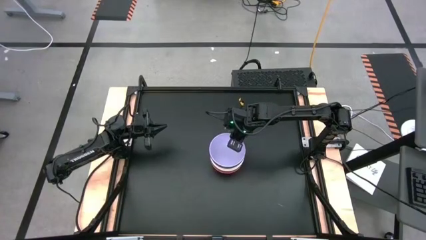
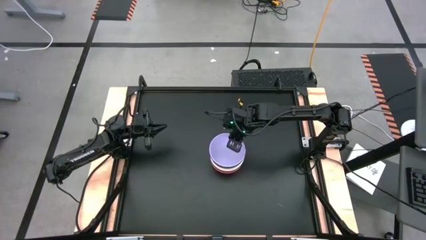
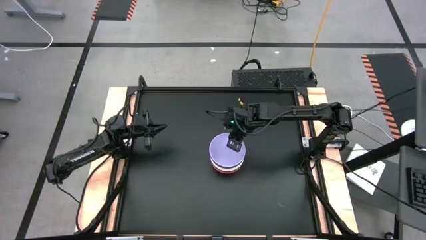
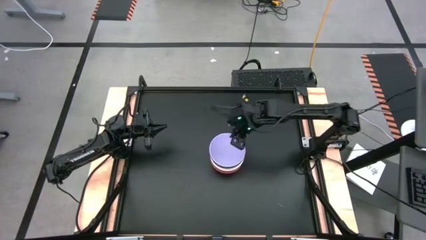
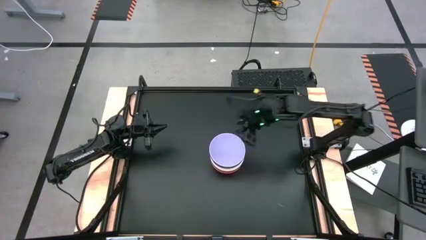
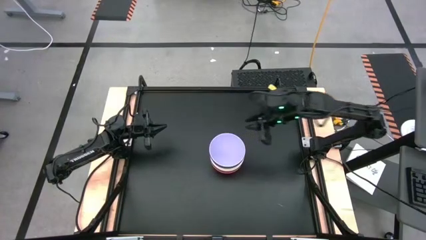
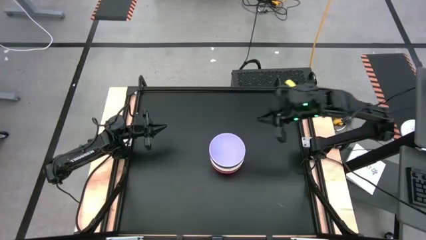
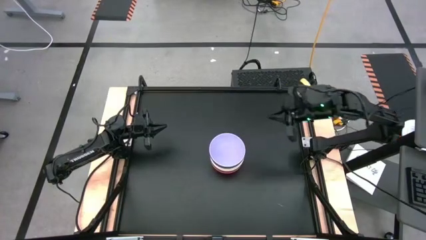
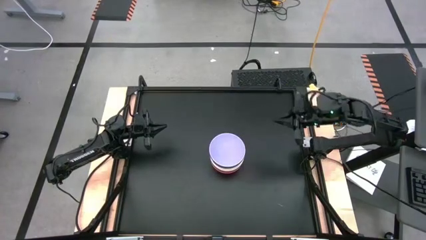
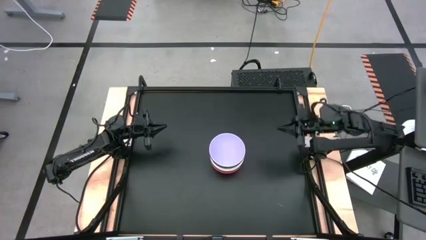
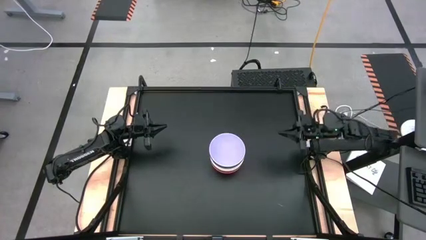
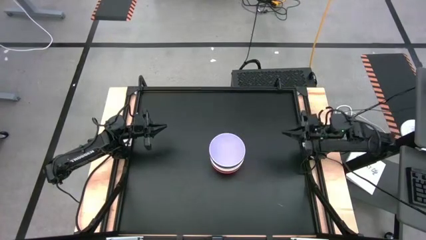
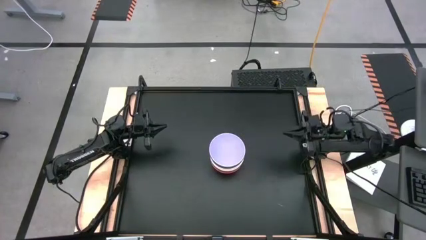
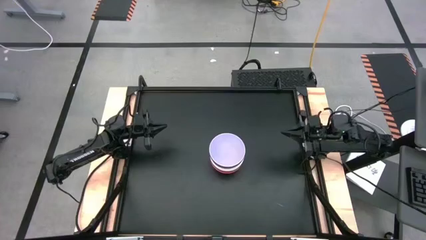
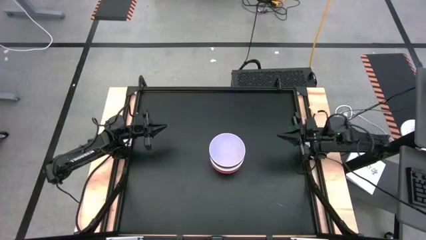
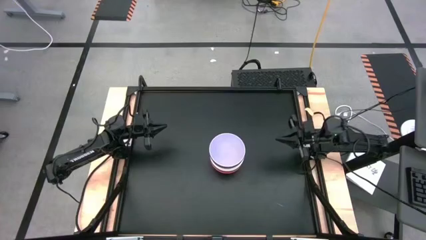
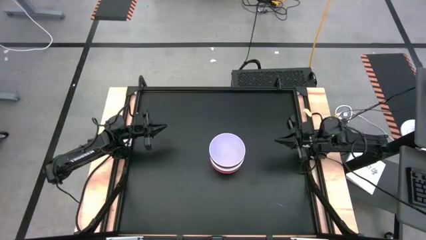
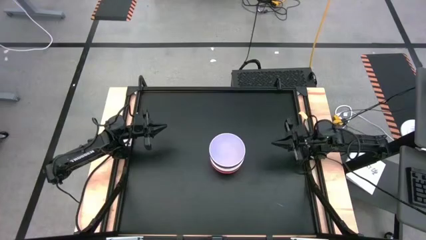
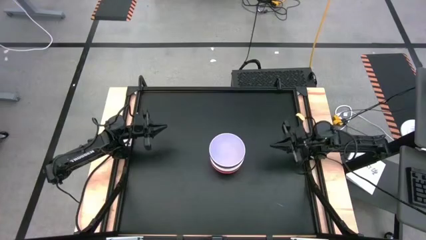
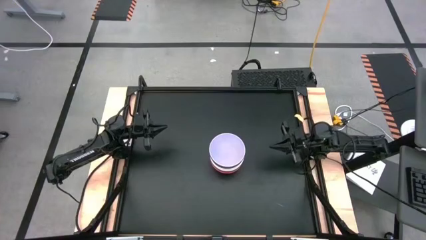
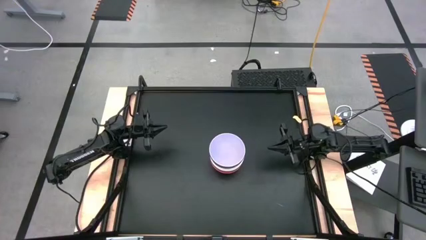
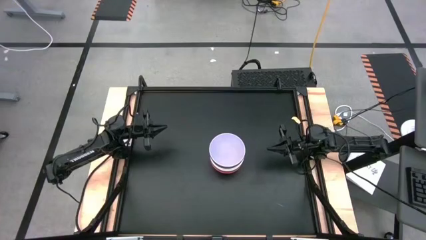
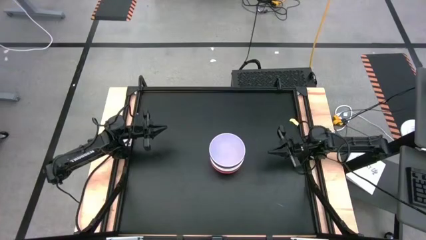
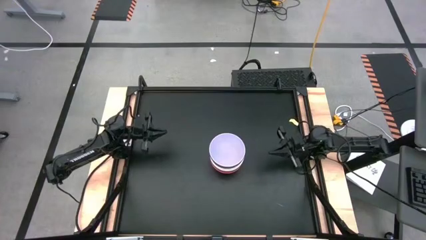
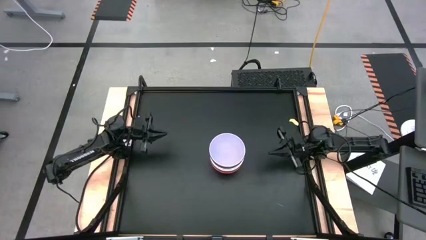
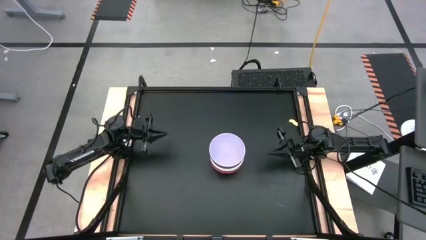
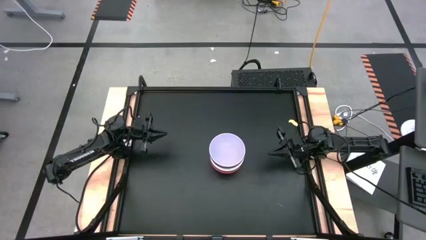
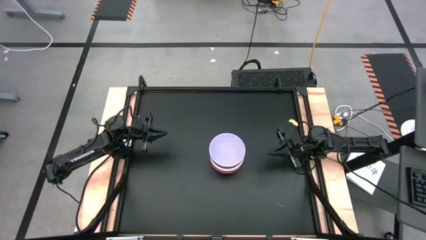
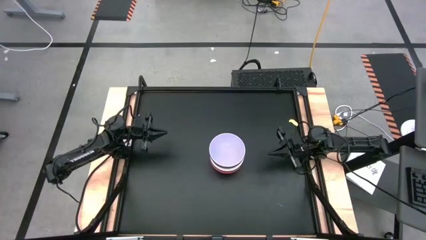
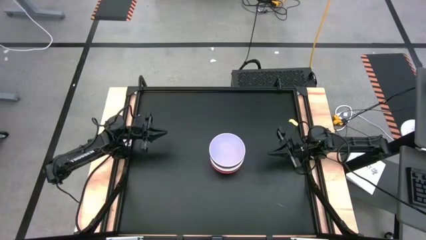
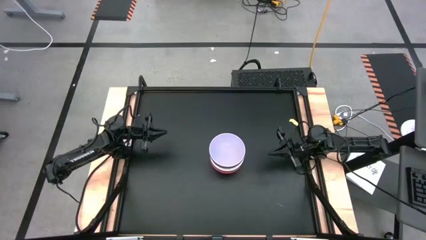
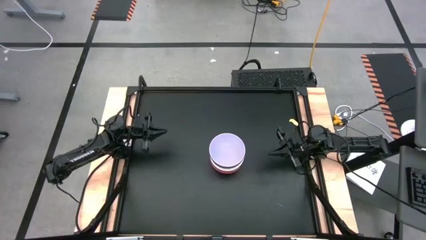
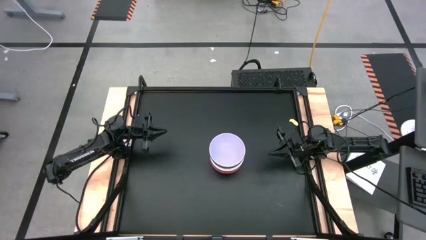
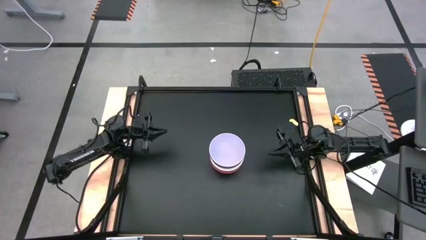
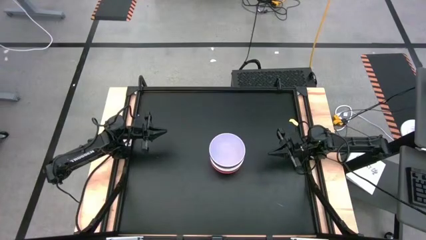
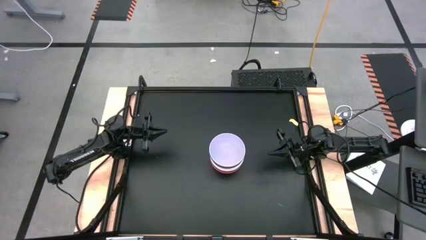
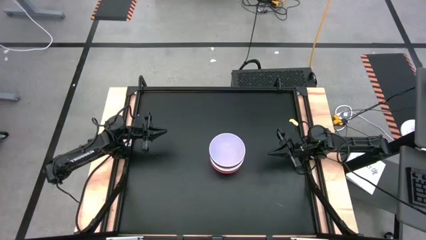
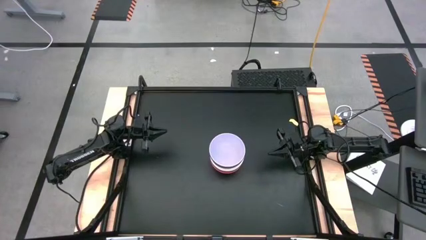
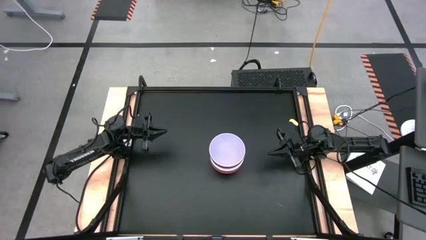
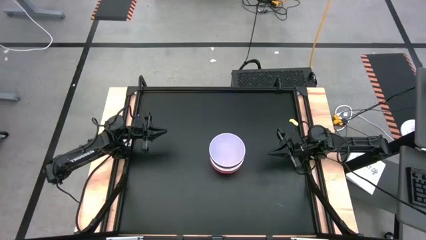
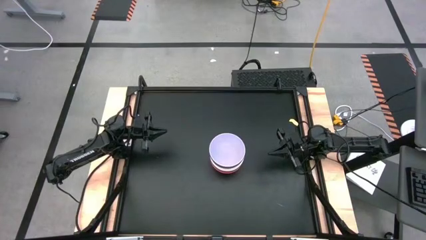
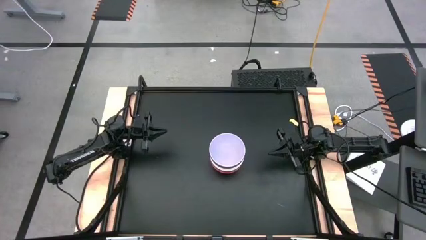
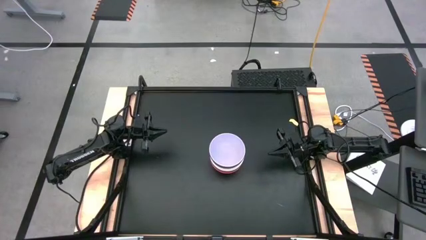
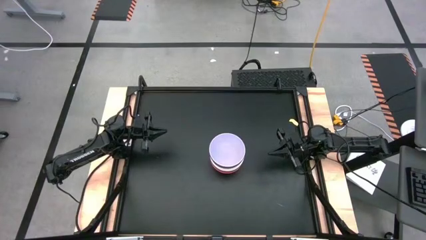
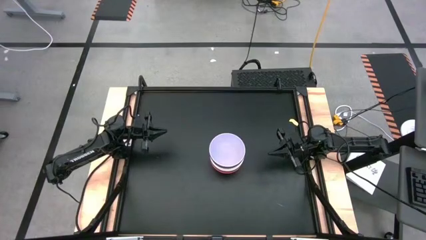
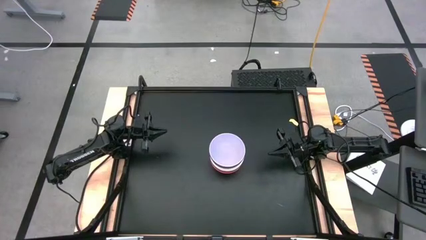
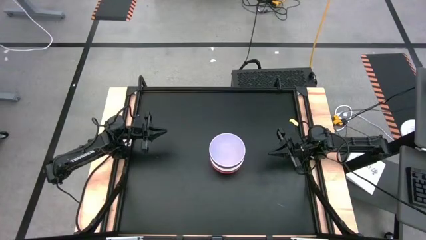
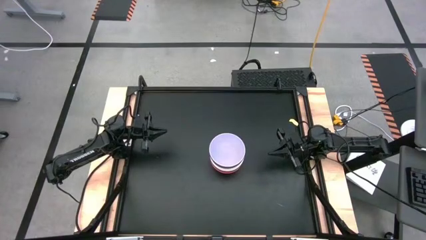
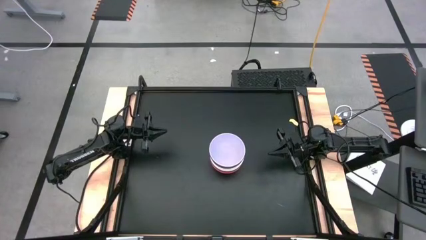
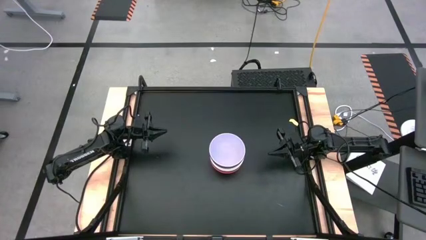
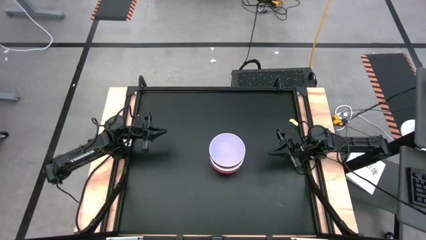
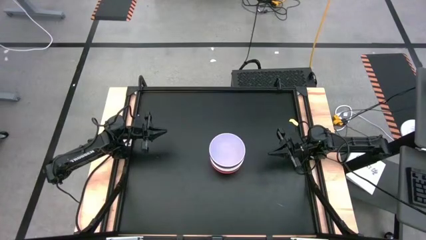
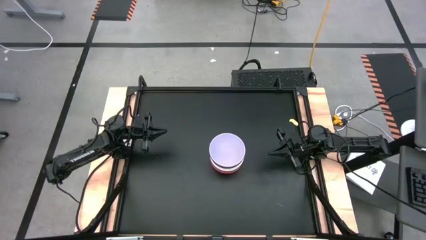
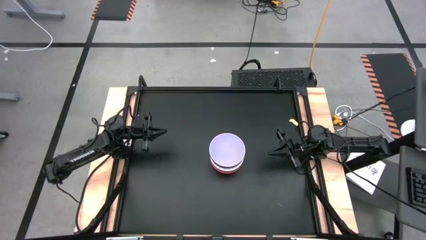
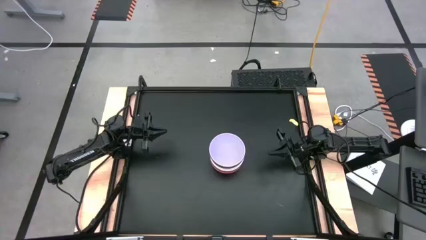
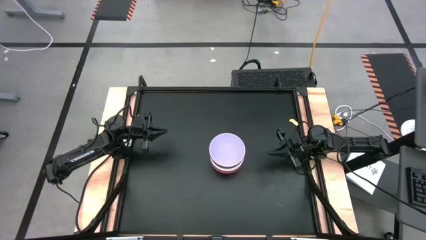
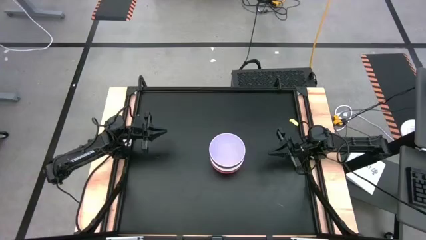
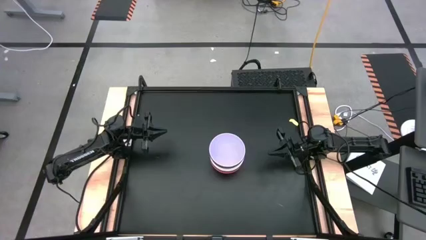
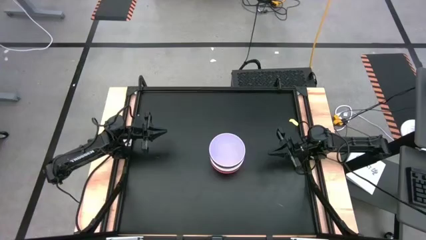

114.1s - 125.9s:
Task: Nest bowls inside each other
Return to Home Position

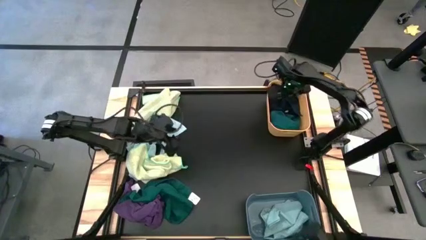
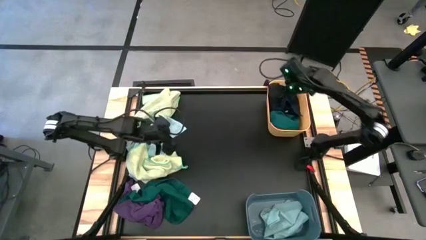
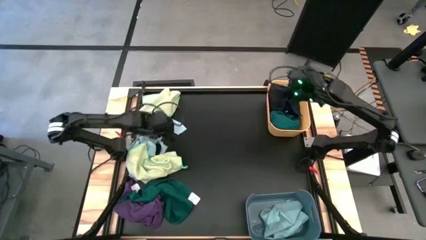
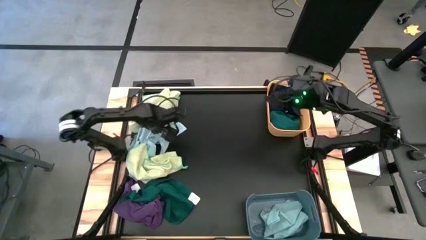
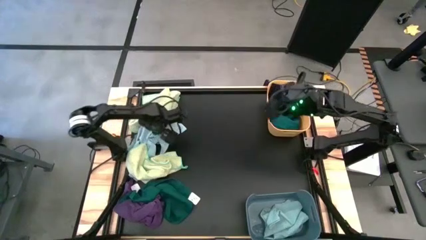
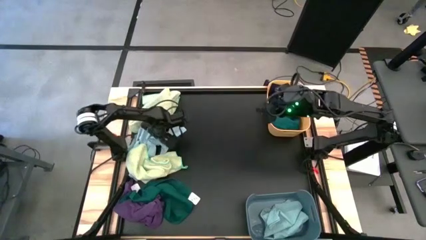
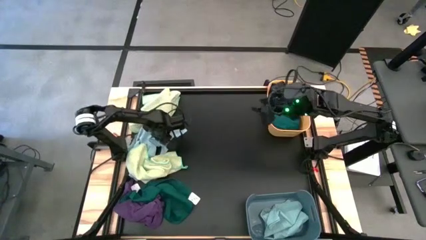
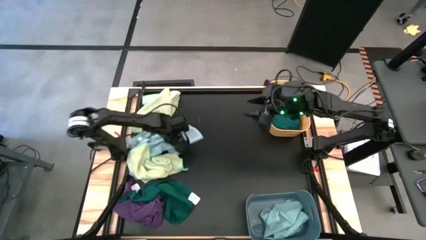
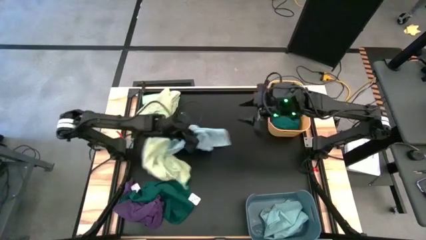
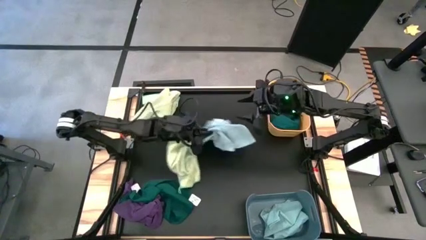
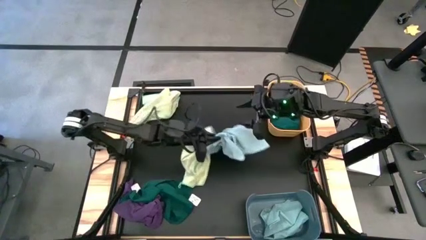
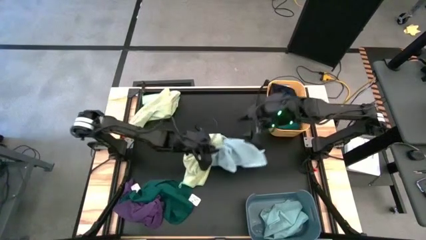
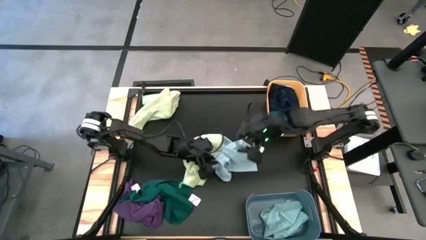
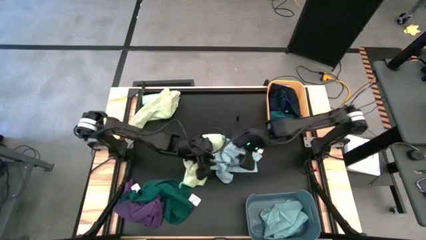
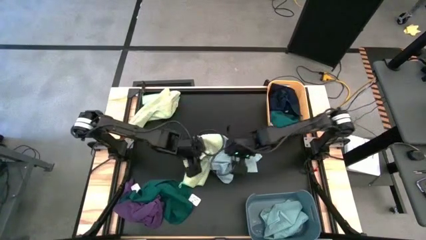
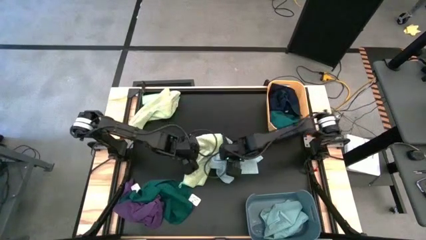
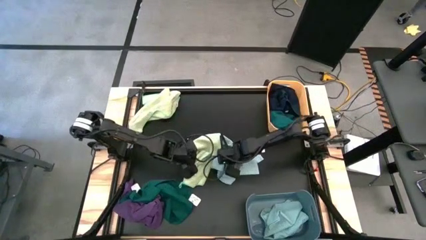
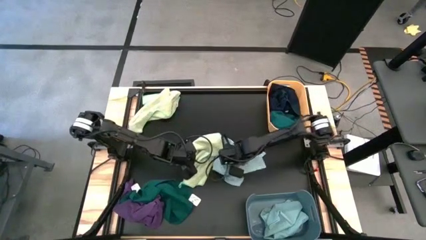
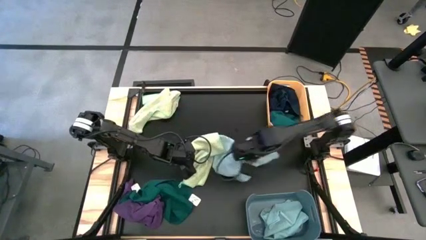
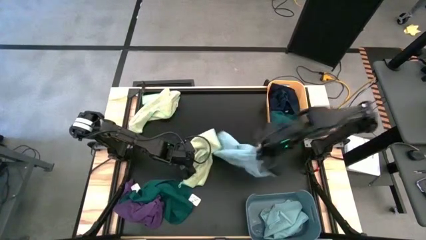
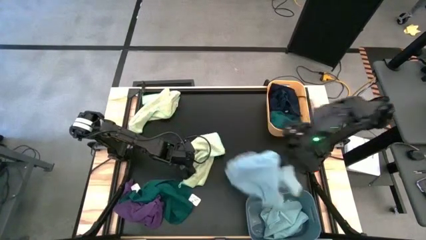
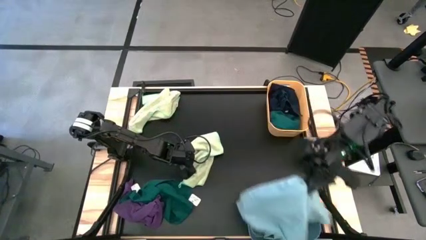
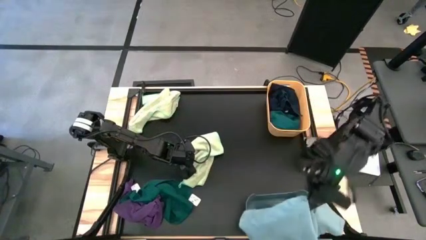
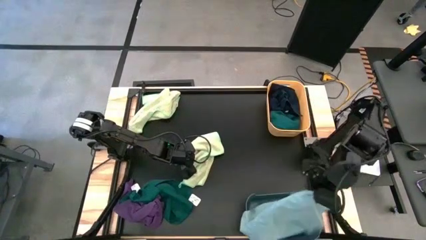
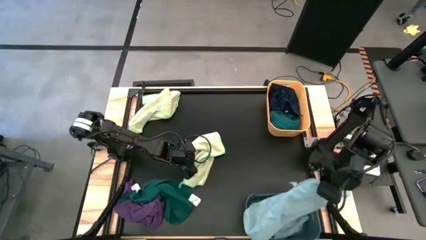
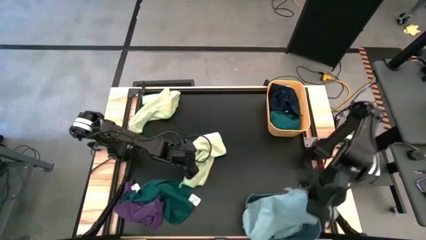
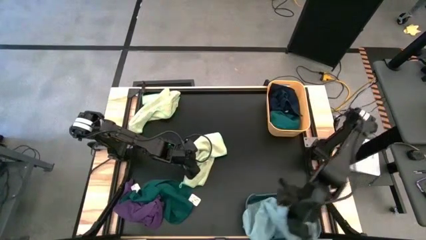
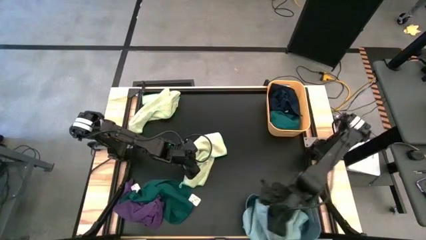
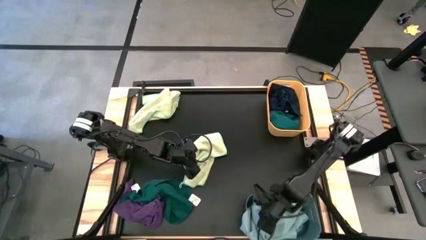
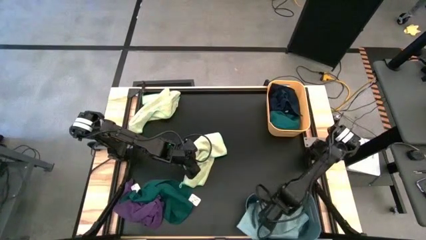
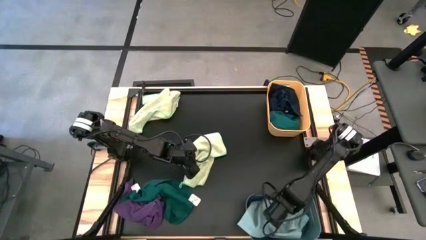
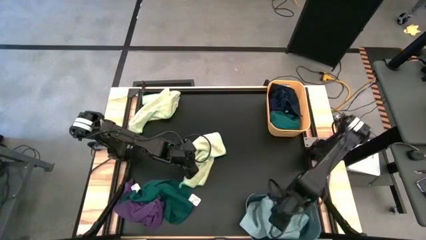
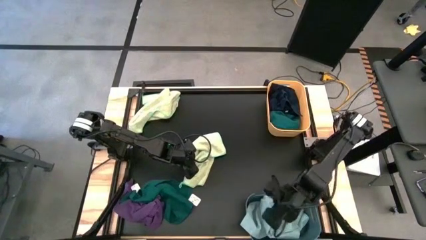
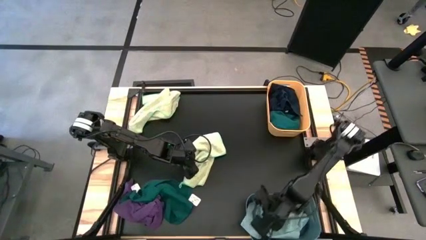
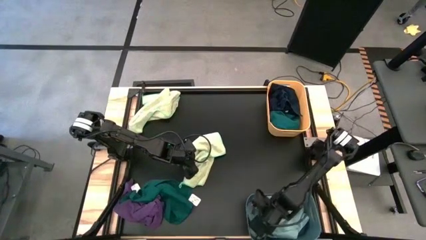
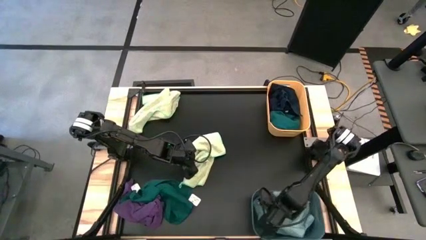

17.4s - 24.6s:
Task: Sort towels by color in basket
Put the light blue towel into the blue bin
